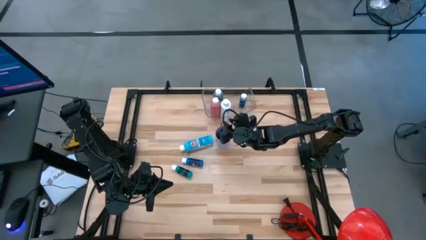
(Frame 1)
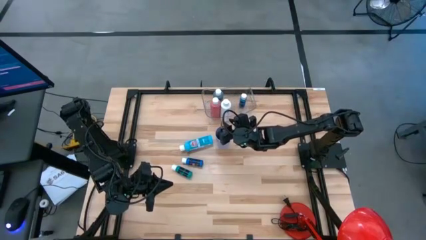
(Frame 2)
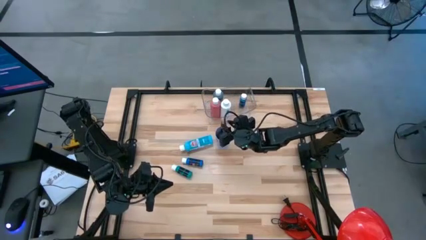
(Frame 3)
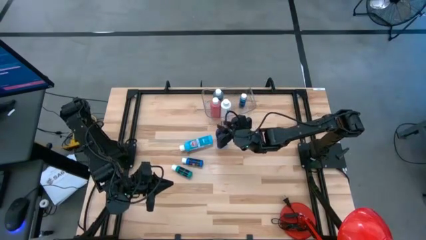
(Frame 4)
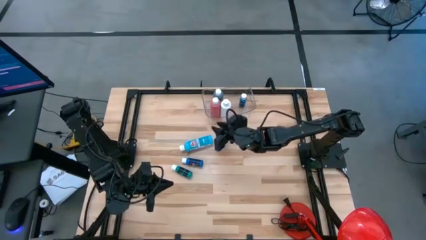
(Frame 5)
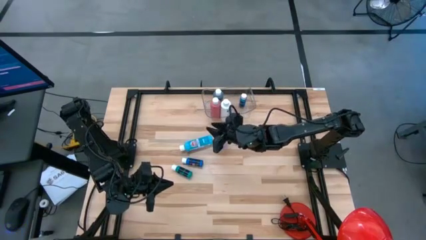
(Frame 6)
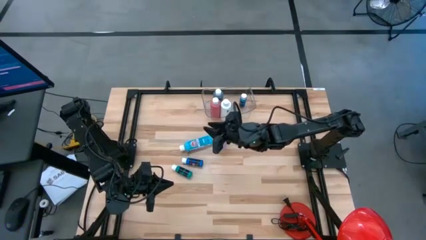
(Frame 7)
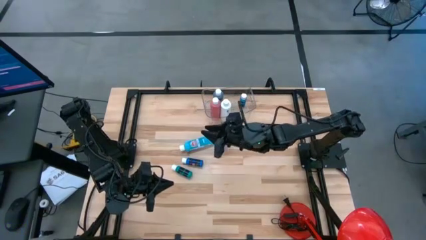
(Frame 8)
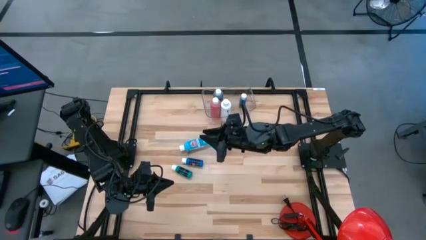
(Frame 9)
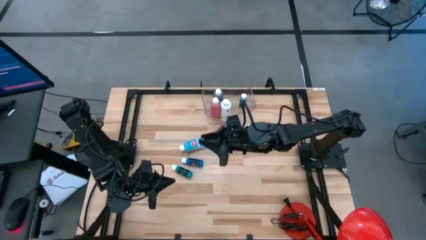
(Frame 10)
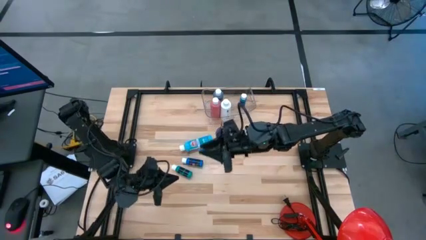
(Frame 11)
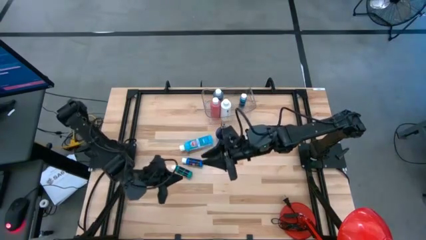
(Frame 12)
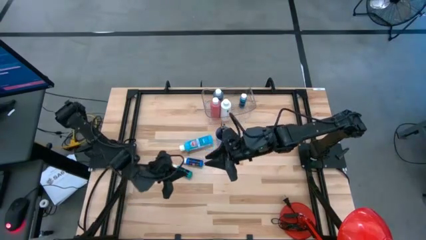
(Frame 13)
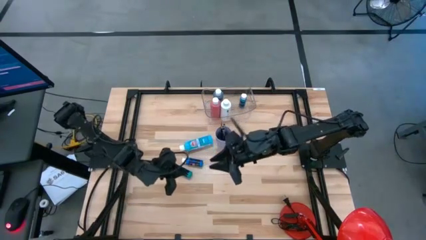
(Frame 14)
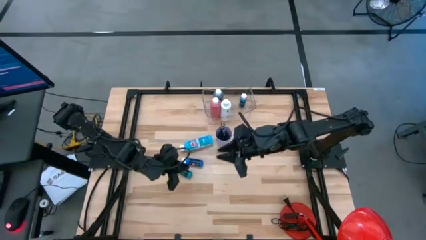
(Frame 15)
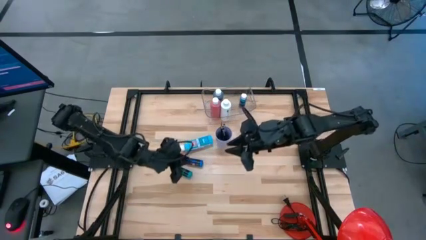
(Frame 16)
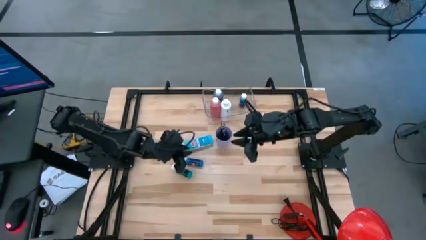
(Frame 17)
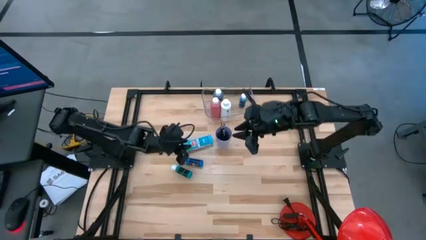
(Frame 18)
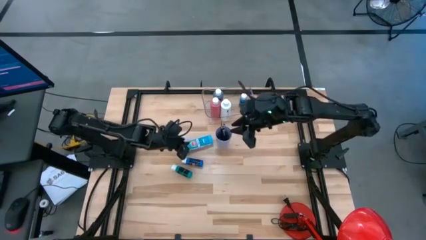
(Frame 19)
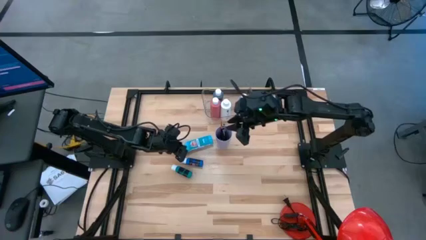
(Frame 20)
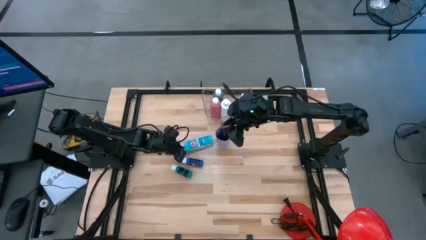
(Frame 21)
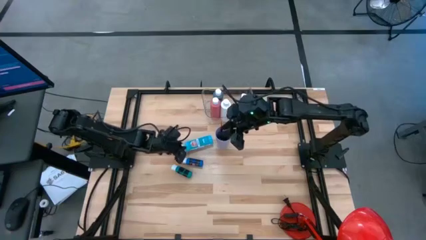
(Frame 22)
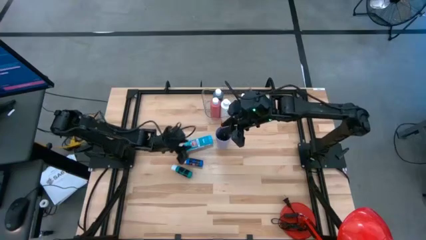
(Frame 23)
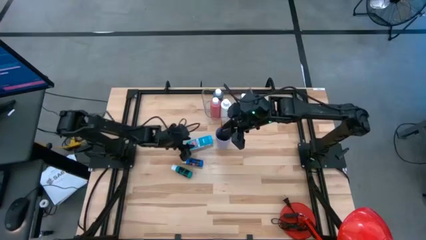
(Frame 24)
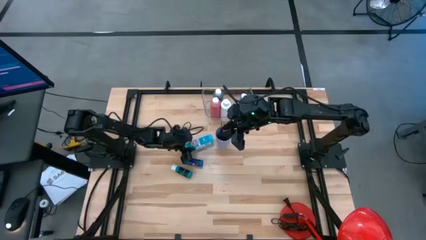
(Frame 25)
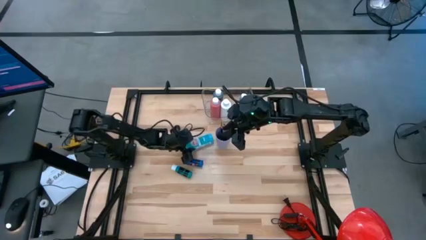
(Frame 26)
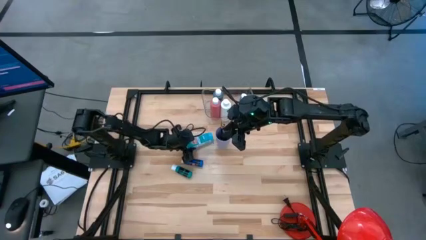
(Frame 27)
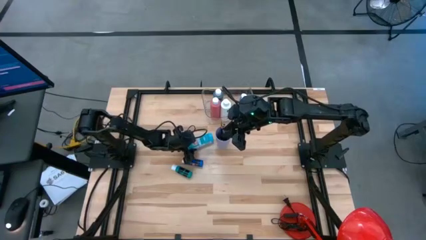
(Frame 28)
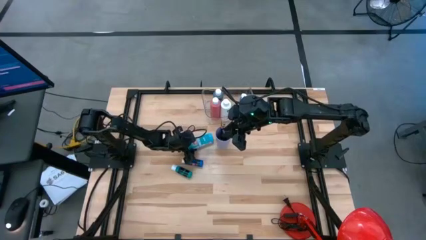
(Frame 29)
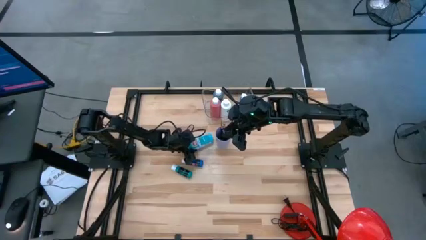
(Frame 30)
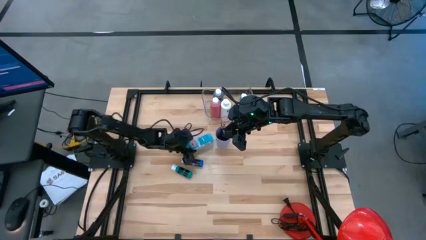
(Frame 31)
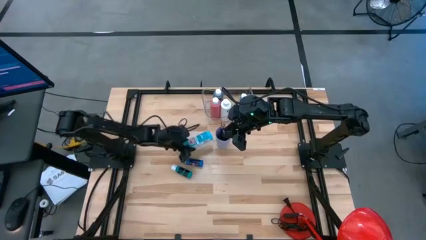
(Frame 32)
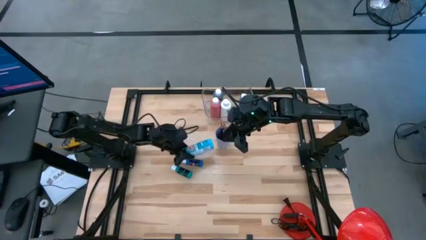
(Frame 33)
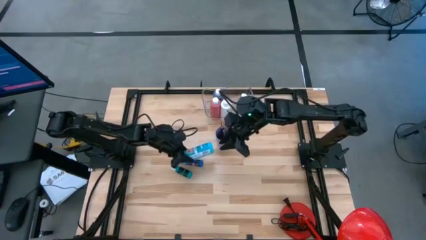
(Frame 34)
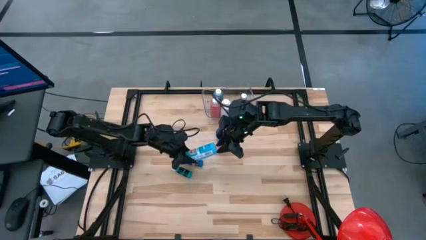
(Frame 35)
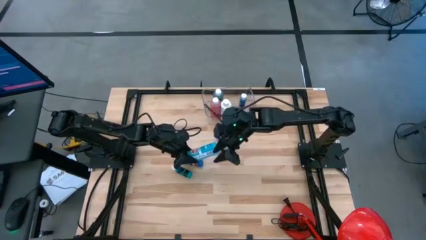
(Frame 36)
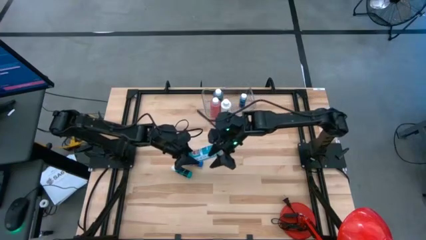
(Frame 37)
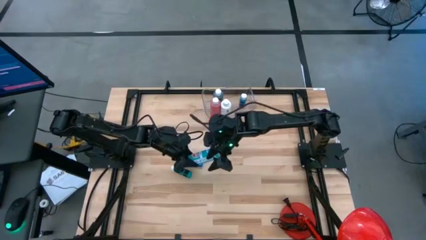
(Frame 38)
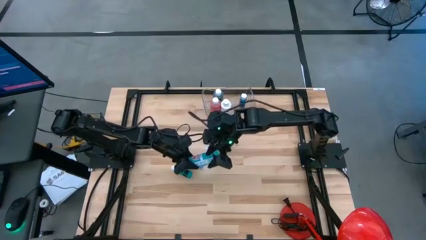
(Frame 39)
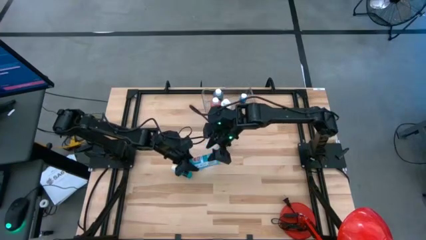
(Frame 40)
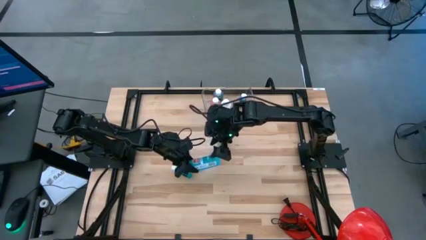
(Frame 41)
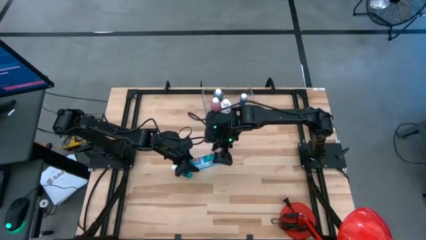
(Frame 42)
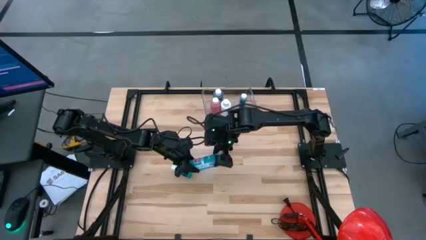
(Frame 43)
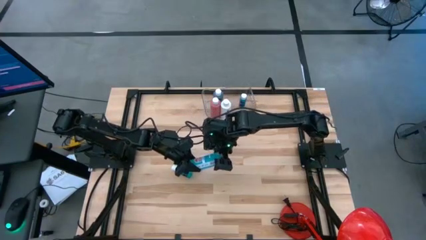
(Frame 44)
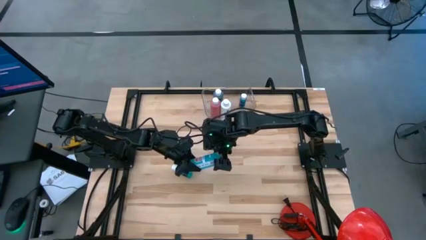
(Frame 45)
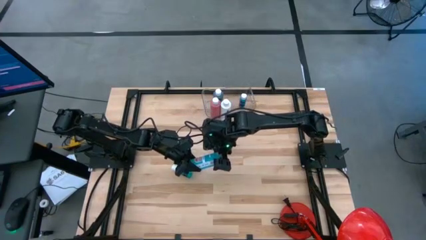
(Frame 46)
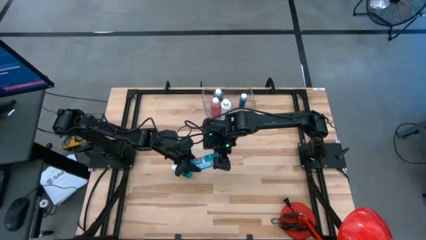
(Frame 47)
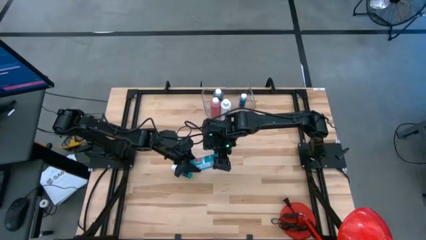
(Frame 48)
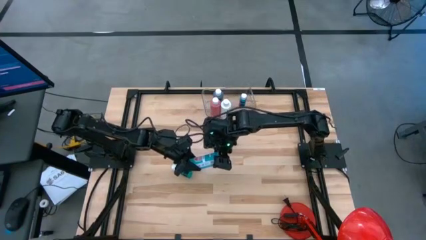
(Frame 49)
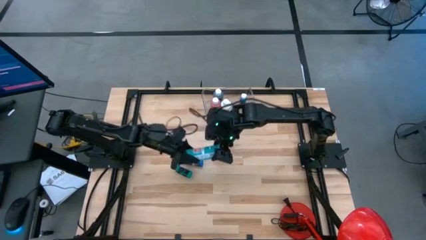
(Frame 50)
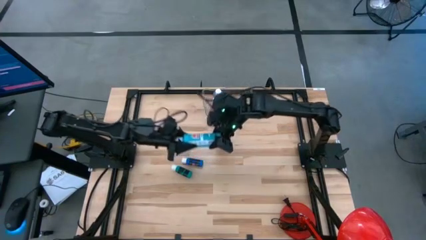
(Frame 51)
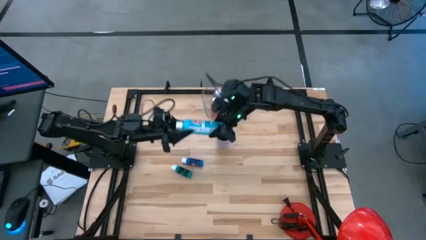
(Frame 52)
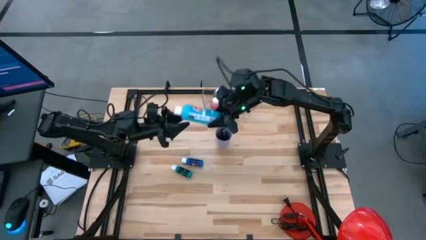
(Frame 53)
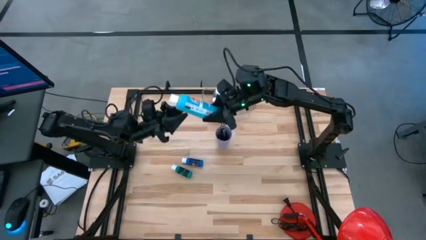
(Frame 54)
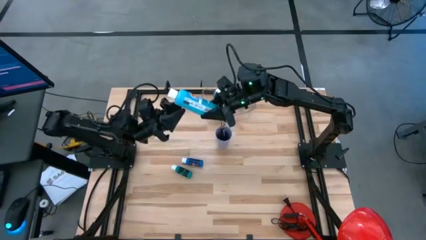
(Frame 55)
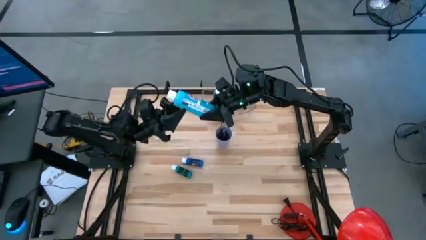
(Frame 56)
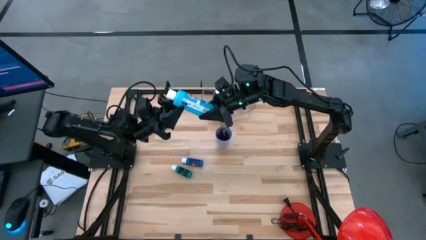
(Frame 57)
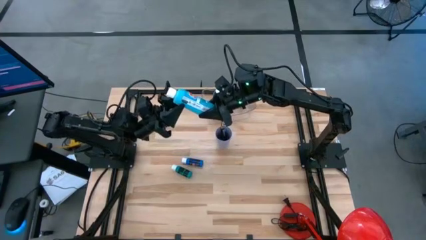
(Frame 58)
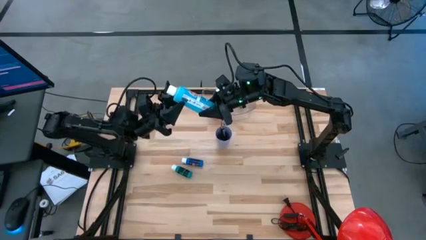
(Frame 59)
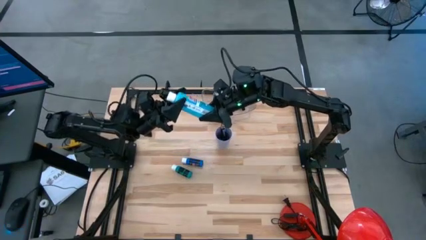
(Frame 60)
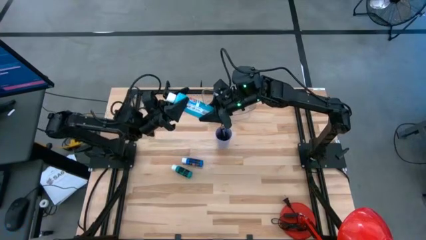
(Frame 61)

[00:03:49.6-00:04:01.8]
Task: Pick & Place Paint Supplies
Put the light blue paint bottle into the transparent bin

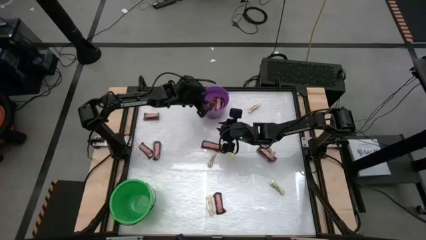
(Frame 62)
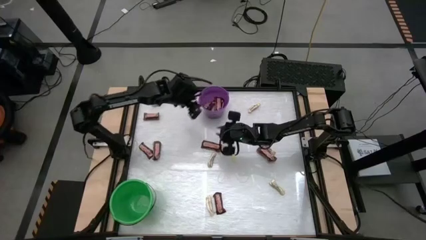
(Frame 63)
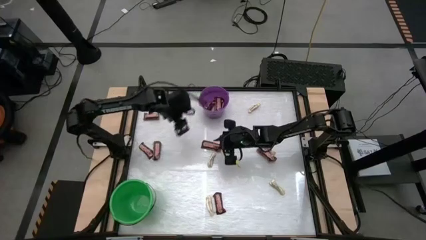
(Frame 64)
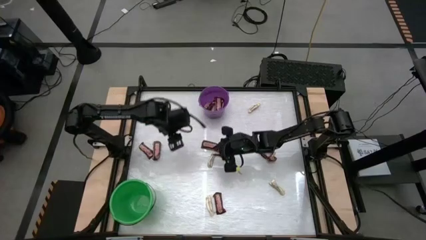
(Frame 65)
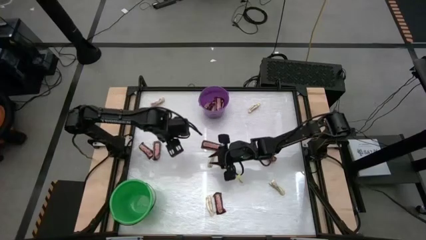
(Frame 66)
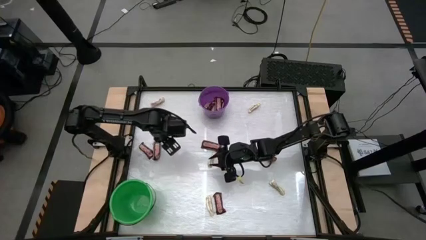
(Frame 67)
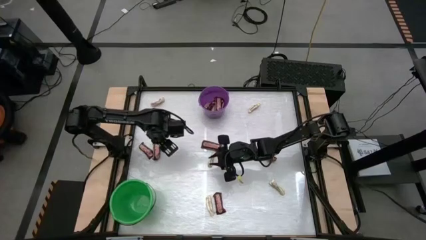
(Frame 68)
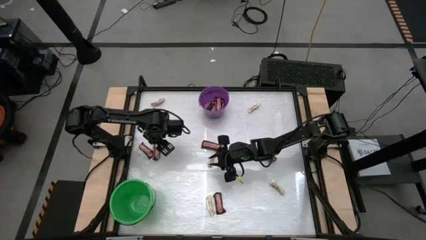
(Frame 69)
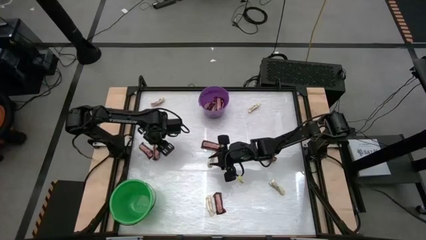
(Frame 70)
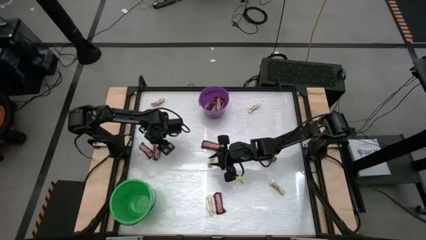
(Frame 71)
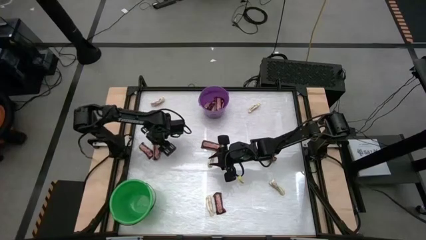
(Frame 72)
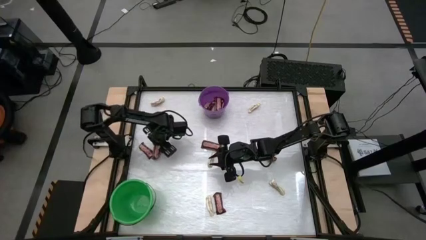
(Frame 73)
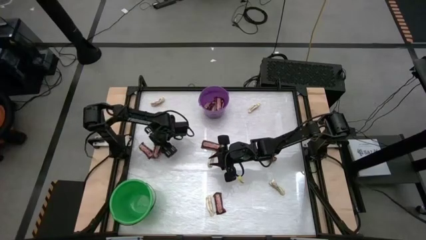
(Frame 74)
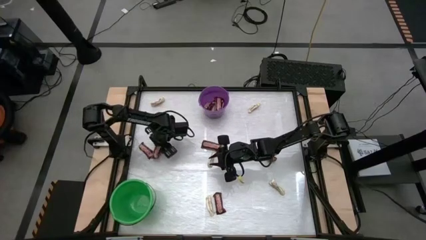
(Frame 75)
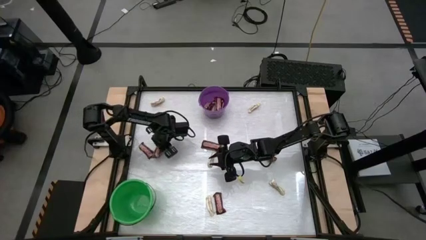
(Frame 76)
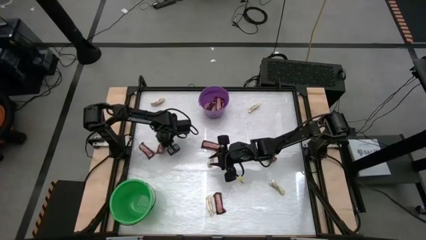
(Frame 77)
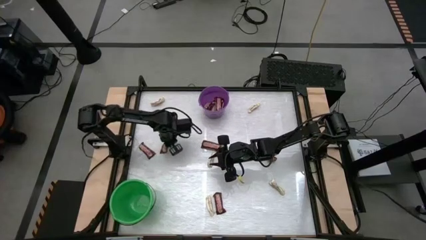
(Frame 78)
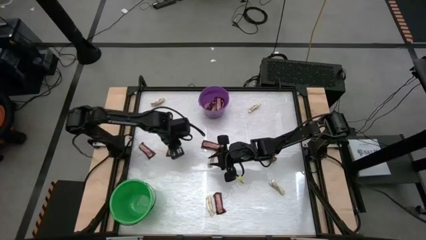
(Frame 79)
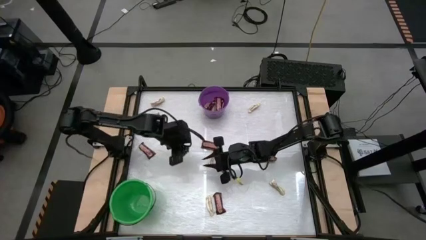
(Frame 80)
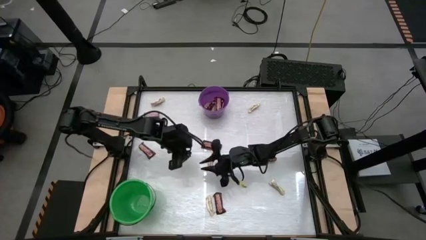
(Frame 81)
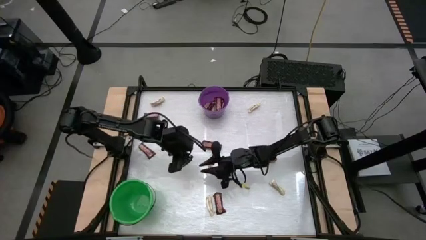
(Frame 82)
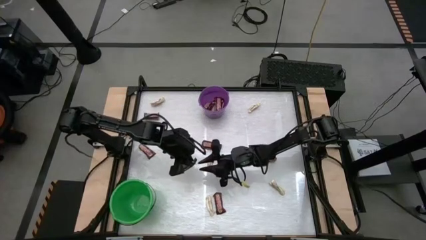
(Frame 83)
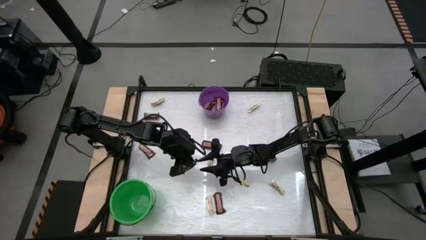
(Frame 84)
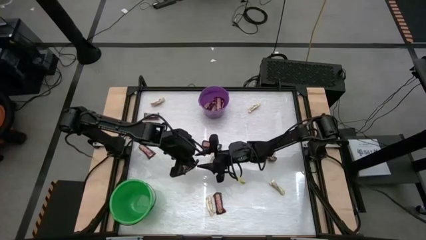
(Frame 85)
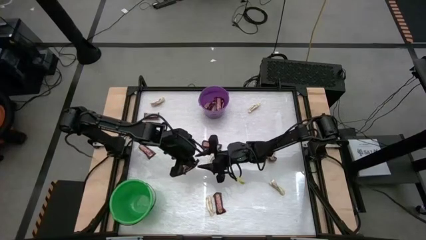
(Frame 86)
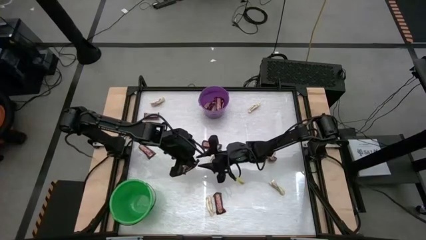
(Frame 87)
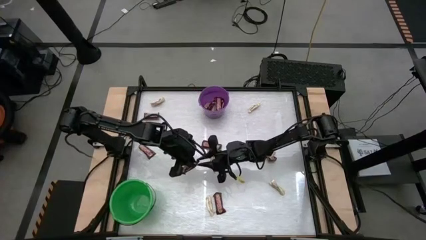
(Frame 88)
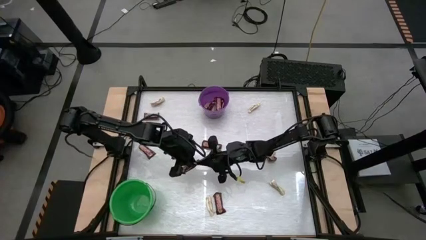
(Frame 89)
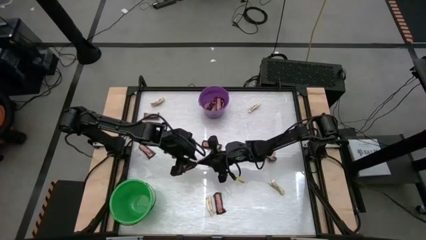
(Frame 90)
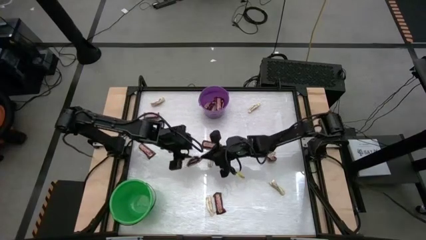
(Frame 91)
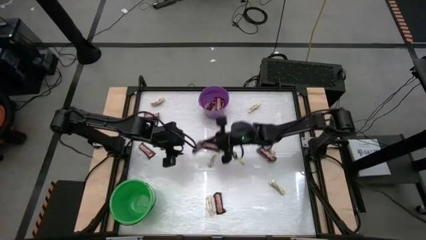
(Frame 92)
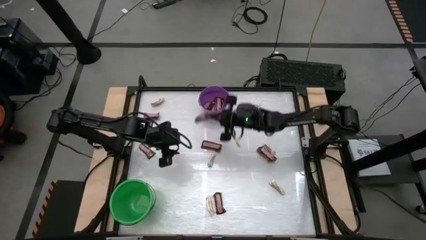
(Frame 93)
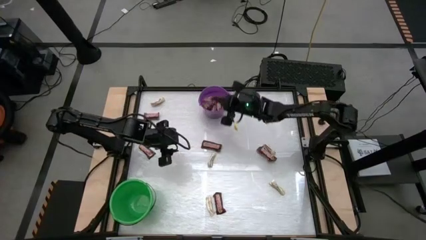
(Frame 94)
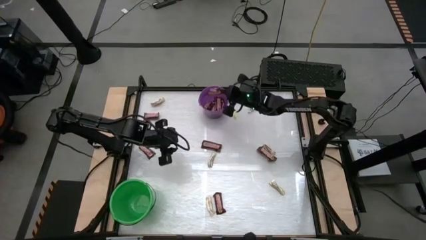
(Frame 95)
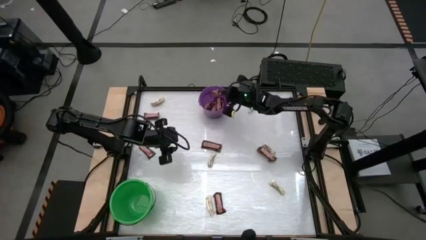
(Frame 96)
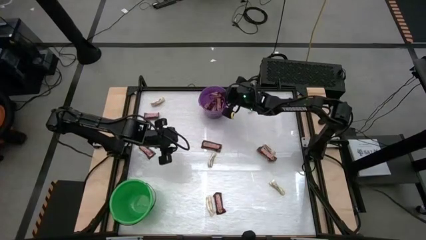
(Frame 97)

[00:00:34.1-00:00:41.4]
Task: Sort candy by brand, put in halloween buckets
Put the brown chocolate into the purple bucket
